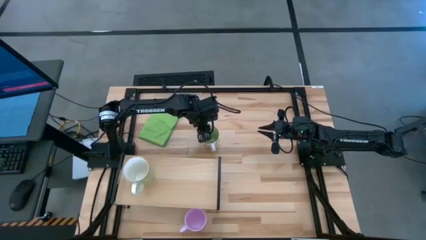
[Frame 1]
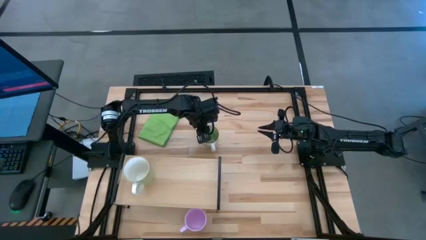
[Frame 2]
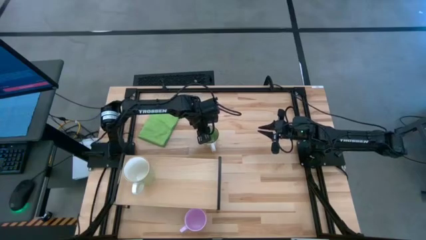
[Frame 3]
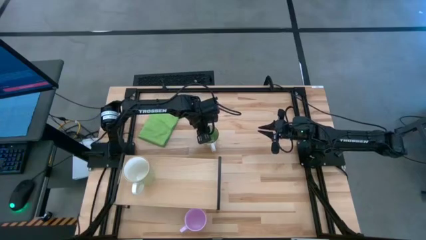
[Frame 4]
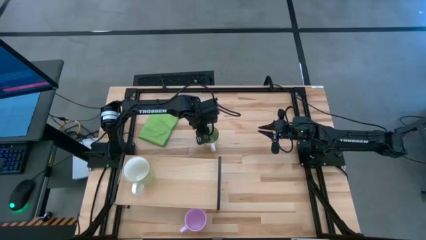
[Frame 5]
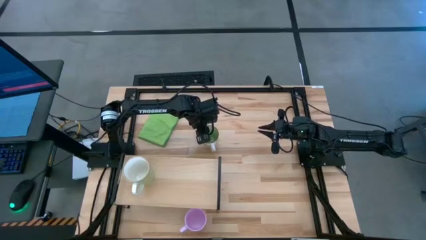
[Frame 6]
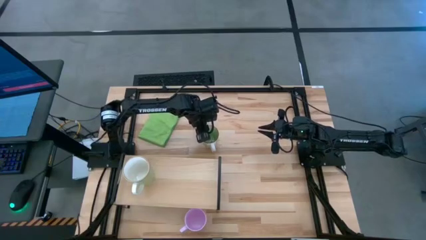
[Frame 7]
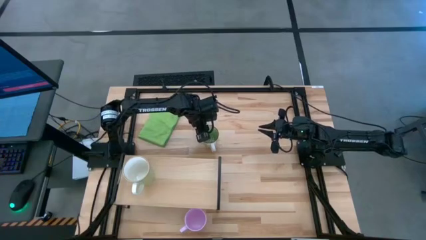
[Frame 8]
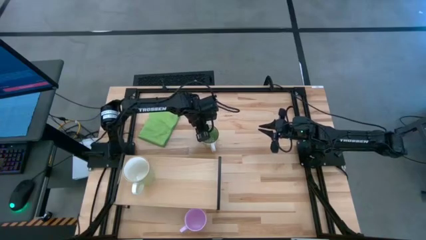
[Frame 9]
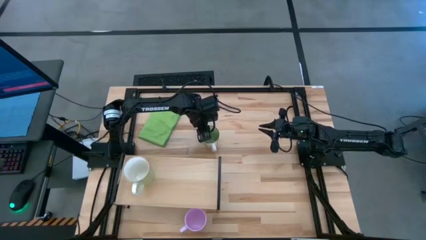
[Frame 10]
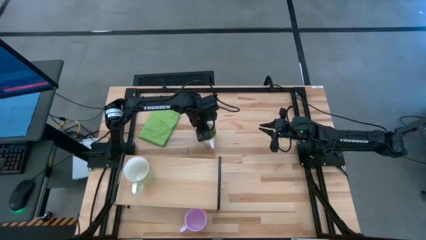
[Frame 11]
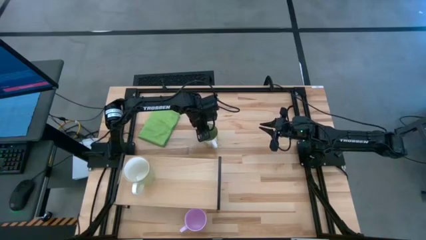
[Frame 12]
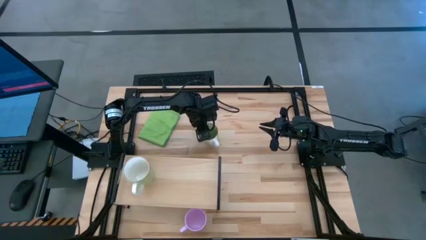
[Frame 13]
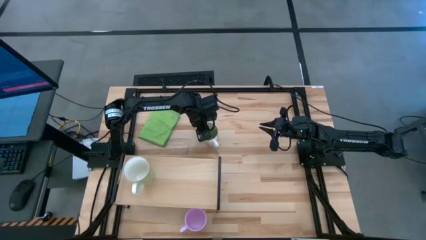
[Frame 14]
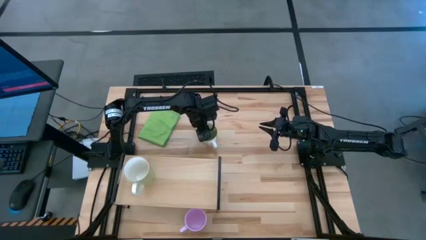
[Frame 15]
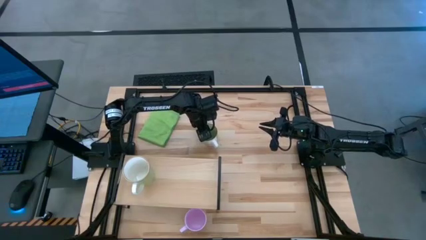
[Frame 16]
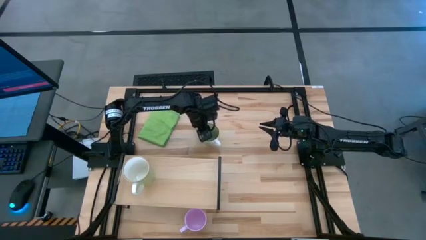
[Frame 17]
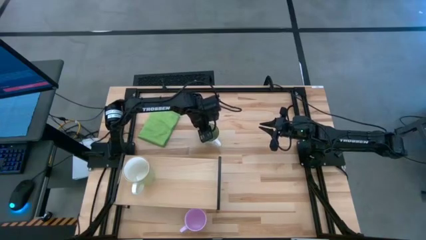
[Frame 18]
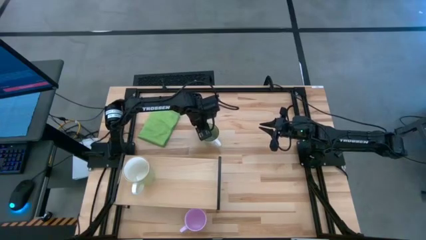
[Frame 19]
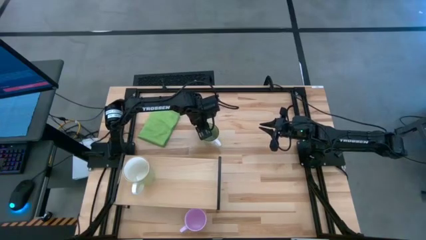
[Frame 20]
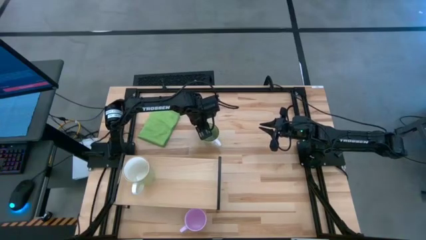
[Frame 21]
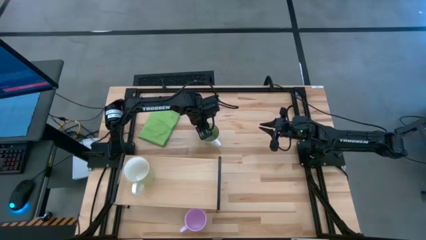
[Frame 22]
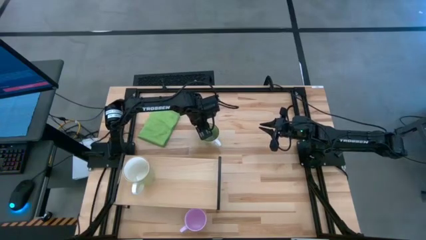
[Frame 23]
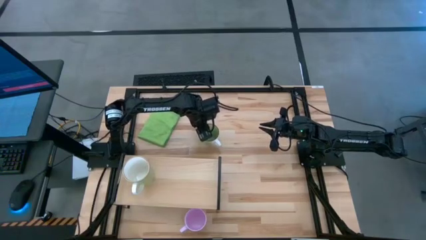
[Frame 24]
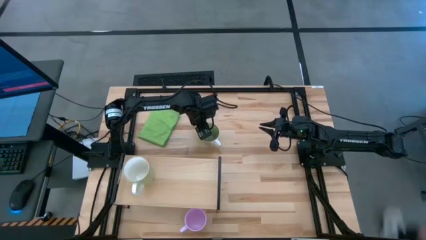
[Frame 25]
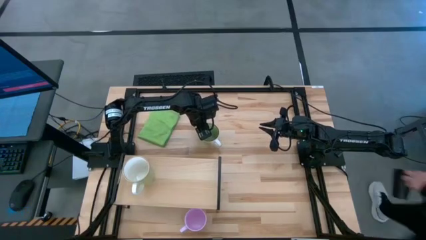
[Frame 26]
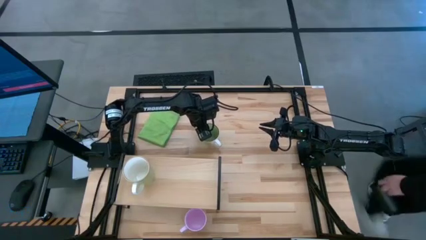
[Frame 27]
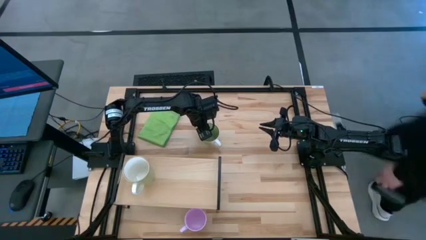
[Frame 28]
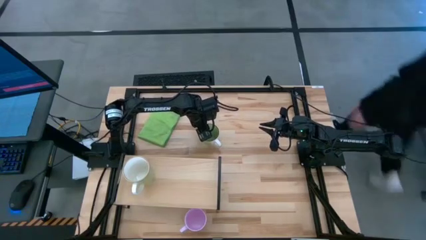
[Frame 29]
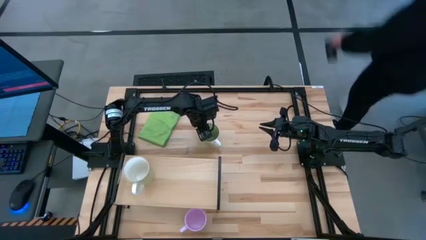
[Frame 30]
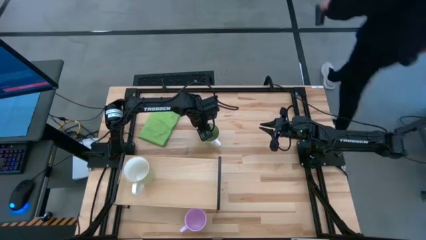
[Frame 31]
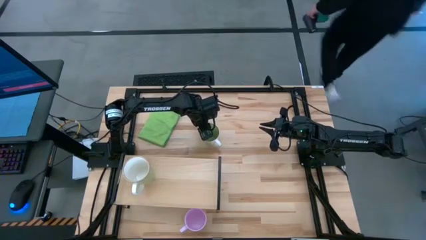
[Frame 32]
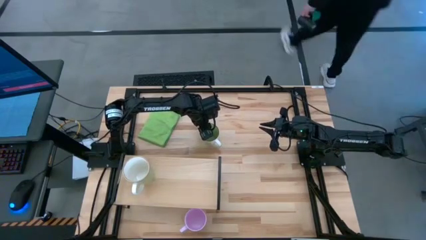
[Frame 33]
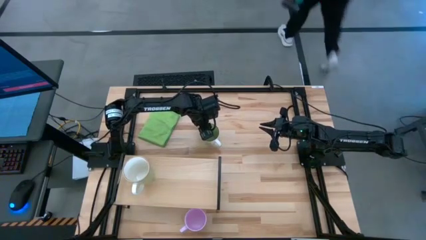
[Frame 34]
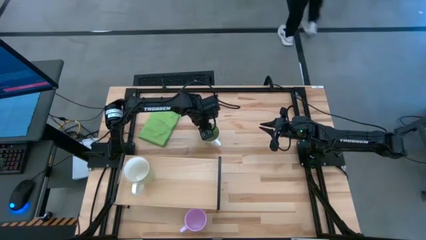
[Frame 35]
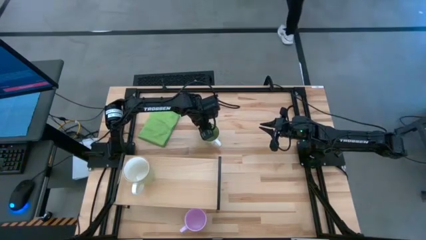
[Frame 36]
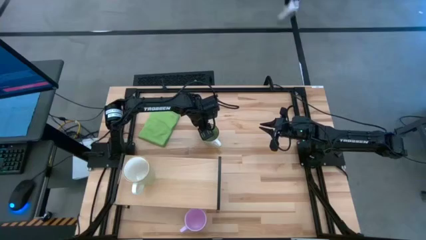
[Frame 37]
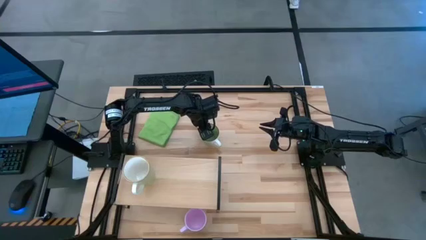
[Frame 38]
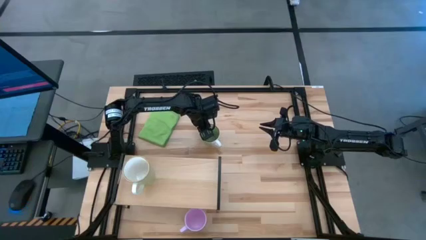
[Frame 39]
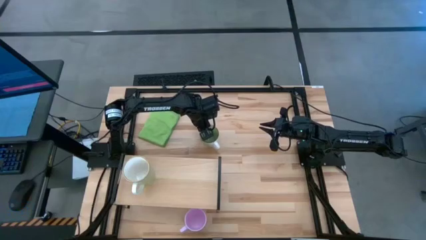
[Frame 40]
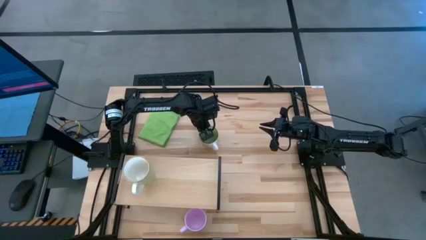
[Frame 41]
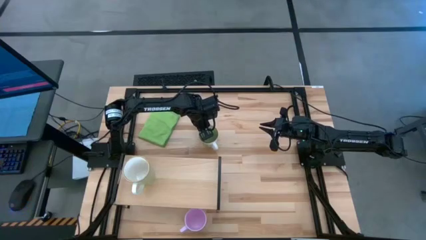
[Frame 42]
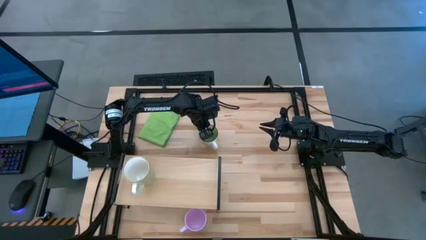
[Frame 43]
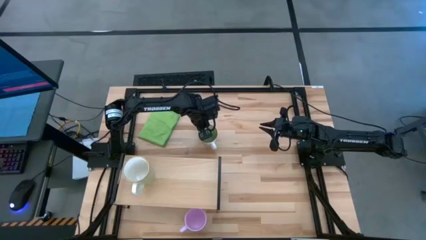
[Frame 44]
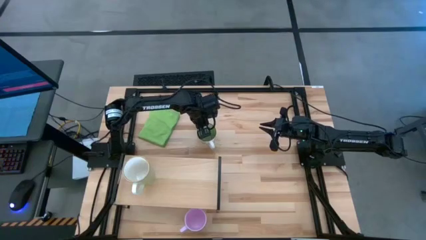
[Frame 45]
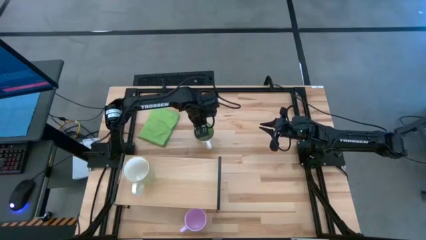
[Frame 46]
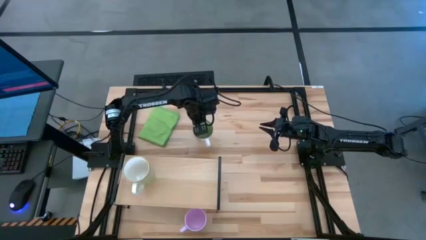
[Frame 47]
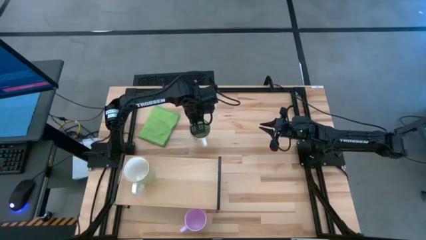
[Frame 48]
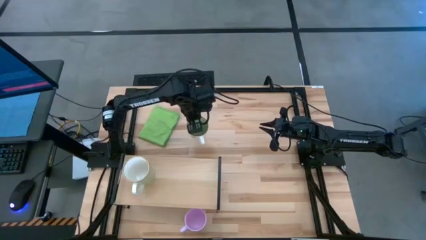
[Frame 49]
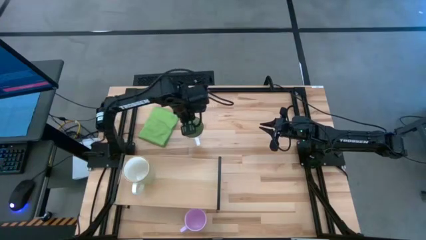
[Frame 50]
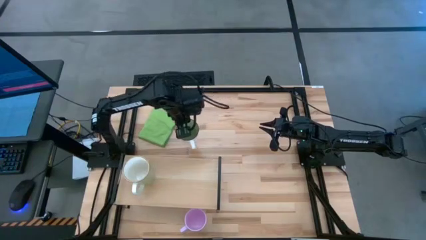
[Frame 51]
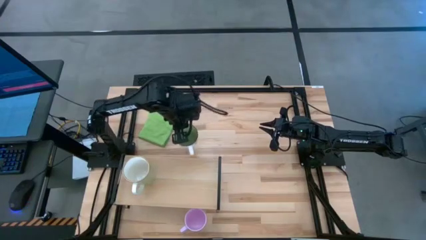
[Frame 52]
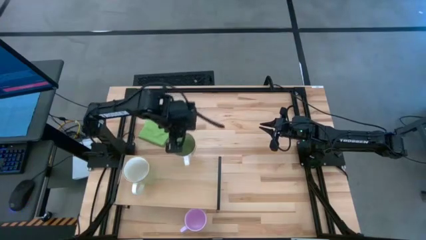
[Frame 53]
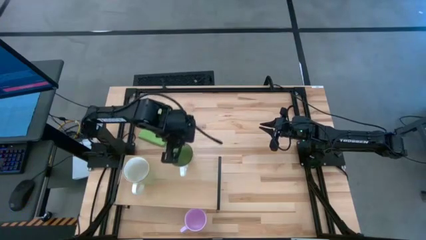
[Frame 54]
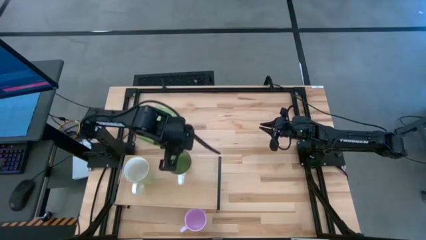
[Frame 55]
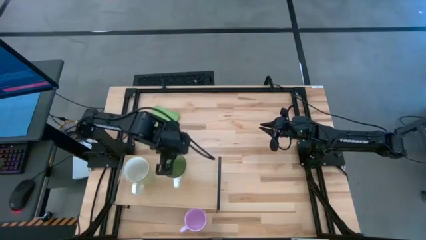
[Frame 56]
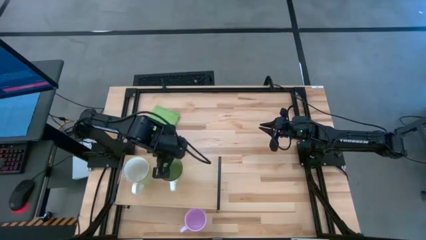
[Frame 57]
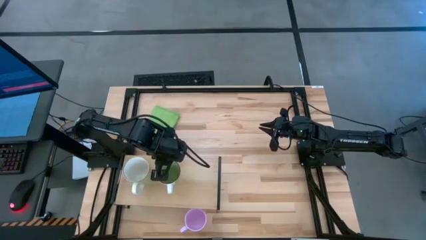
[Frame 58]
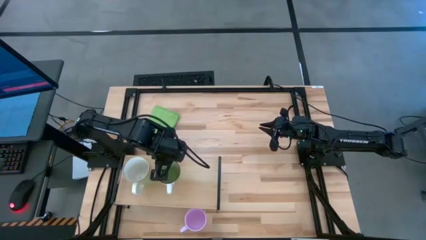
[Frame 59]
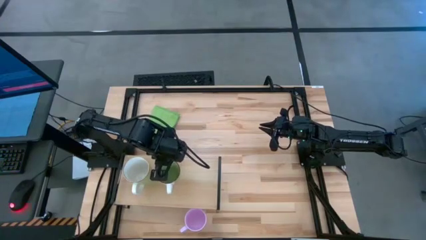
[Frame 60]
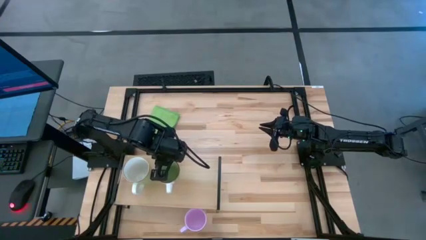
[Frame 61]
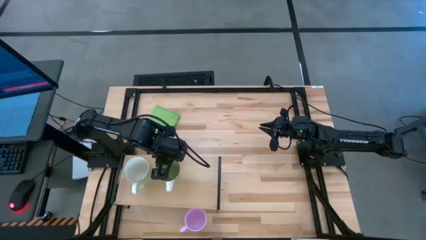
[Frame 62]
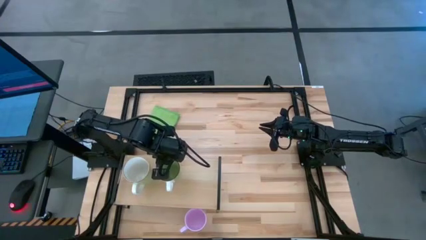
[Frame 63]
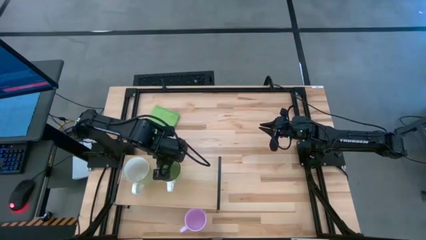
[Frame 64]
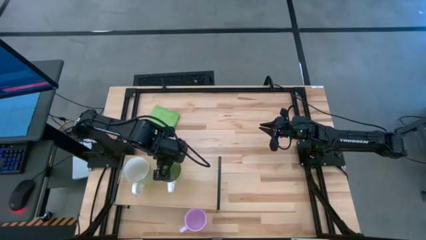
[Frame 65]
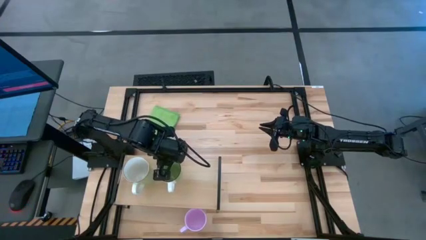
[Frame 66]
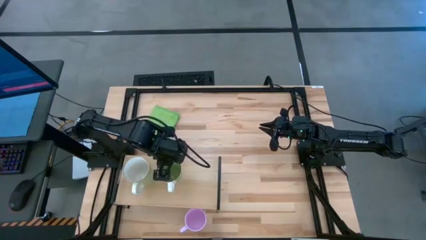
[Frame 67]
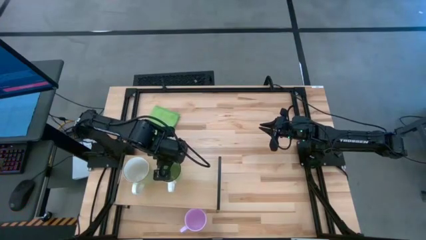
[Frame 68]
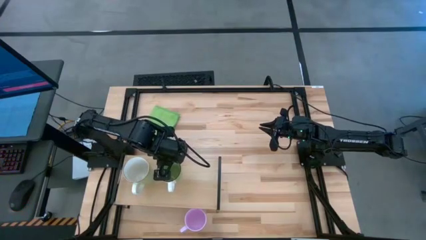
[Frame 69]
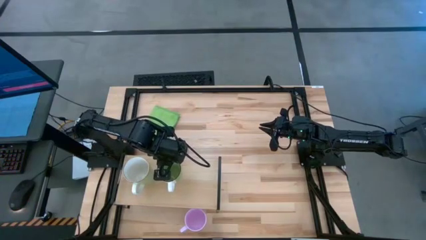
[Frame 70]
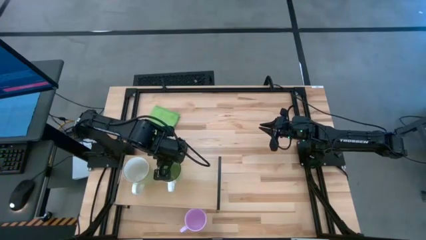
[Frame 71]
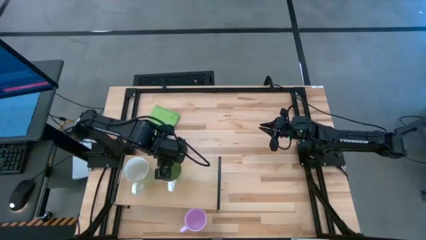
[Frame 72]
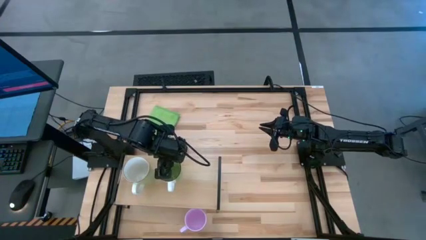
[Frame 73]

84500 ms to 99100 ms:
Task: Stack small to large cups/mugs on shelf
Put the green mug on the shelf

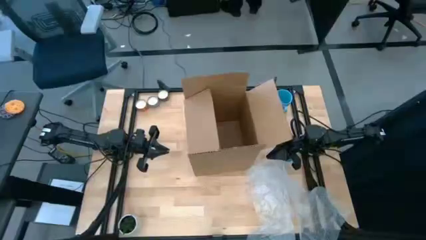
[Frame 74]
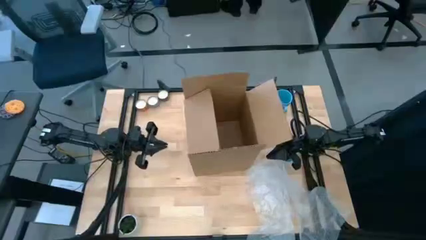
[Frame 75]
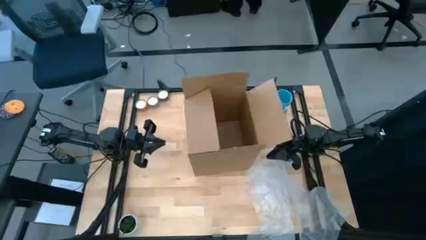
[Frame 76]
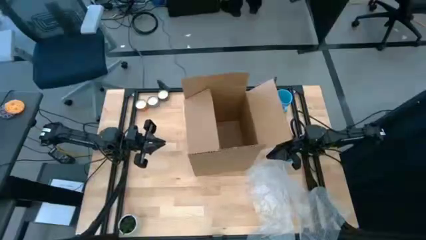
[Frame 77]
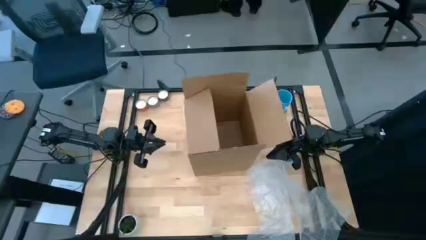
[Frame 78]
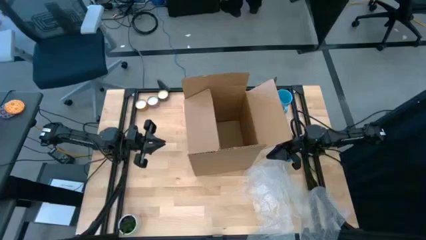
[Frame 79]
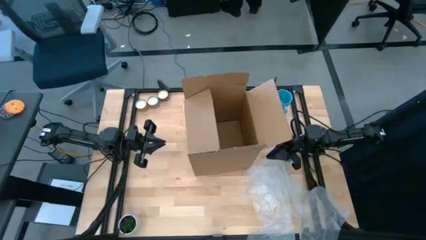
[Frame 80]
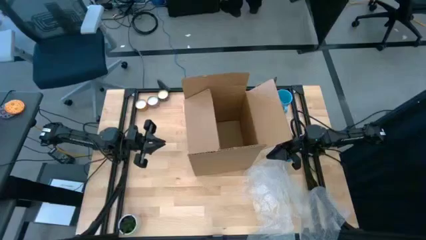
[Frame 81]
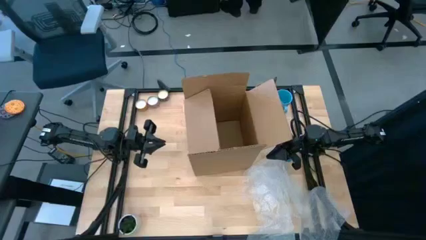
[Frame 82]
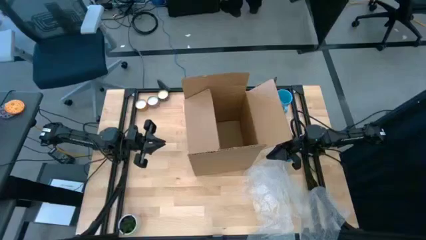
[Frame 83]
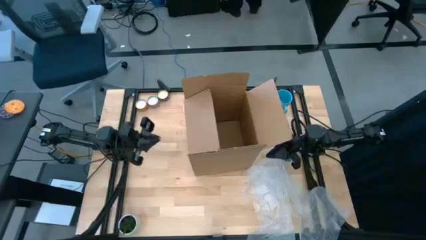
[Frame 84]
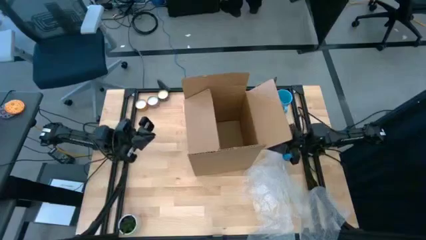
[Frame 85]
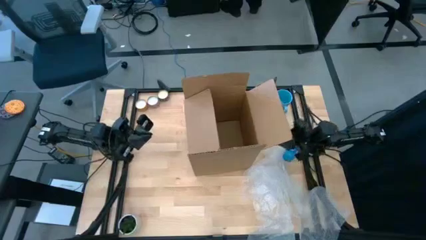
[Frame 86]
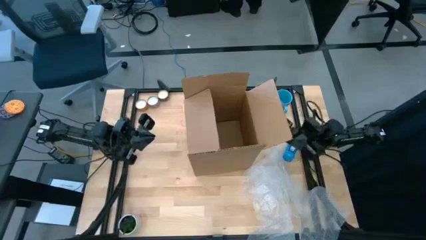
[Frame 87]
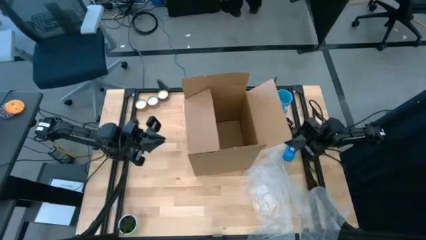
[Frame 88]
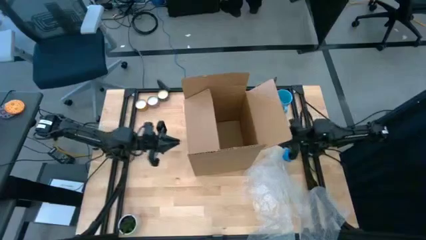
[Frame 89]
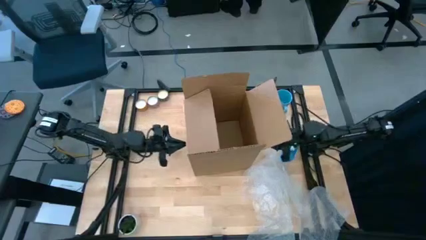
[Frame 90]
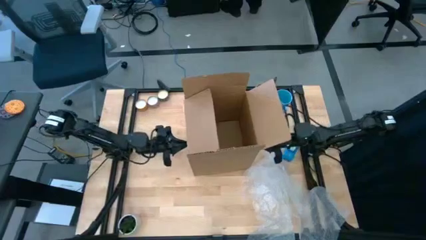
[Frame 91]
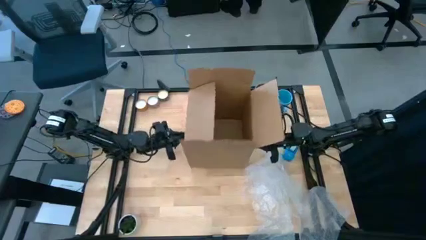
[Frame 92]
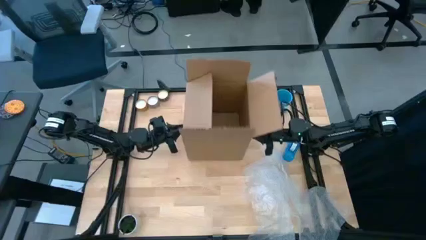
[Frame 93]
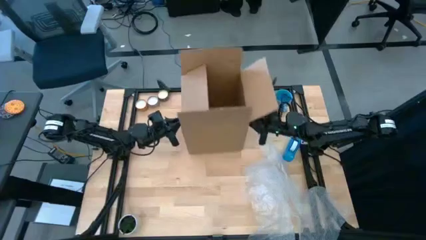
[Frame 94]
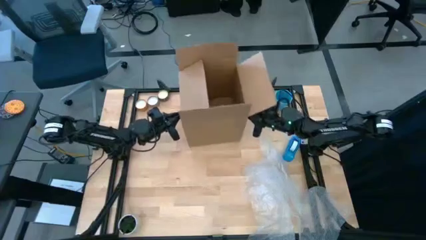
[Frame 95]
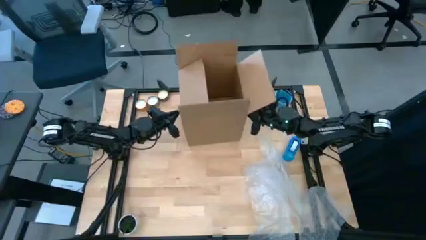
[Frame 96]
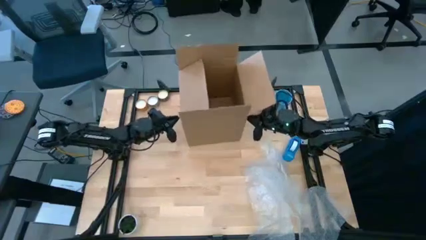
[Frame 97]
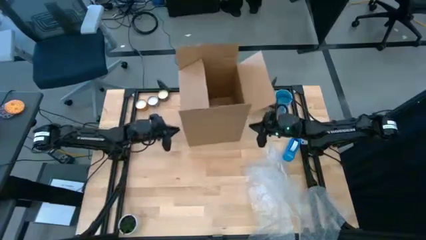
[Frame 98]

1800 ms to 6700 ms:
Task: wrap mug
Move the cardboard box to the upper middle of the table
